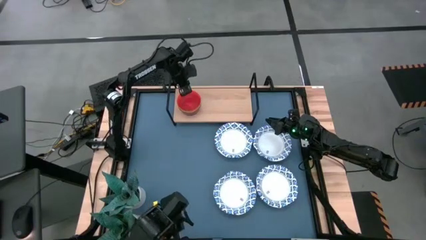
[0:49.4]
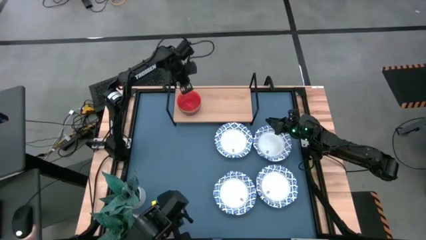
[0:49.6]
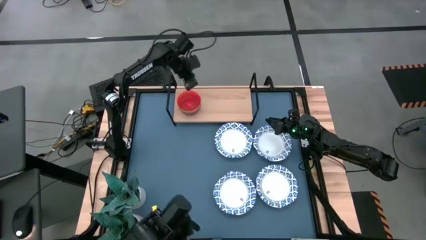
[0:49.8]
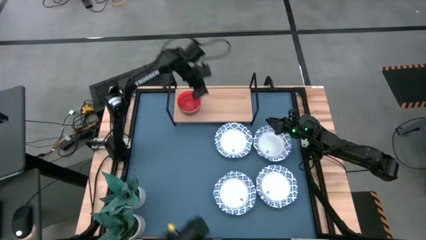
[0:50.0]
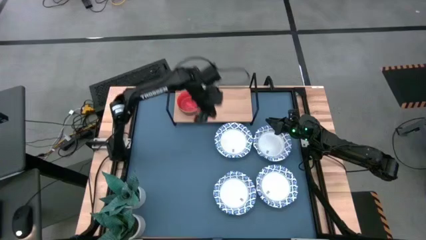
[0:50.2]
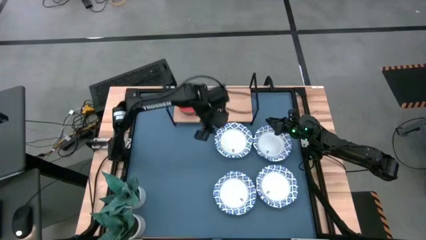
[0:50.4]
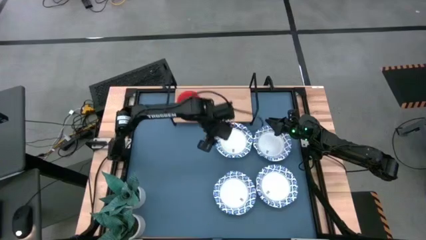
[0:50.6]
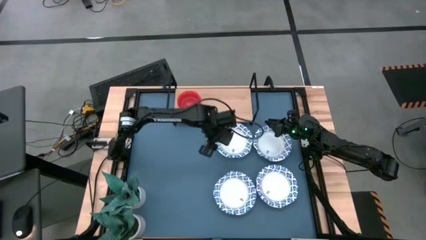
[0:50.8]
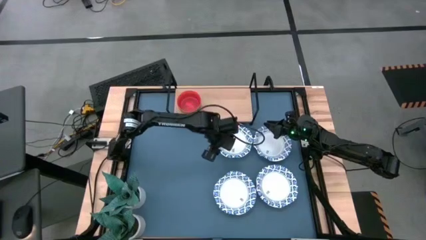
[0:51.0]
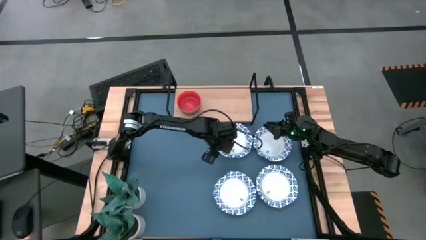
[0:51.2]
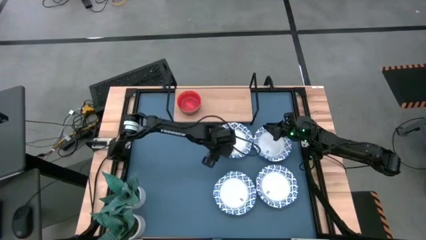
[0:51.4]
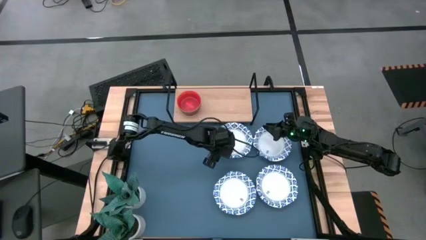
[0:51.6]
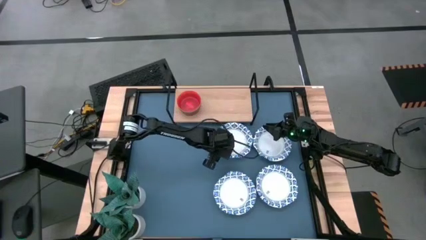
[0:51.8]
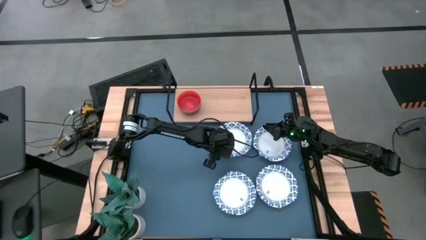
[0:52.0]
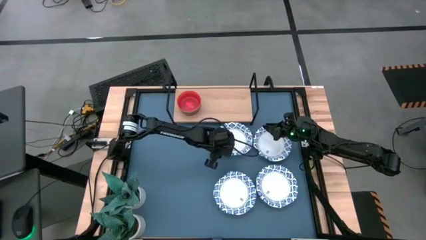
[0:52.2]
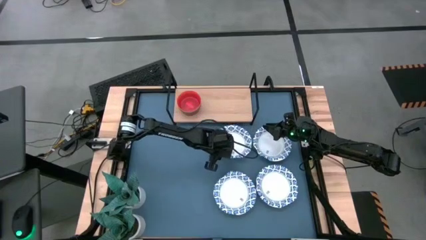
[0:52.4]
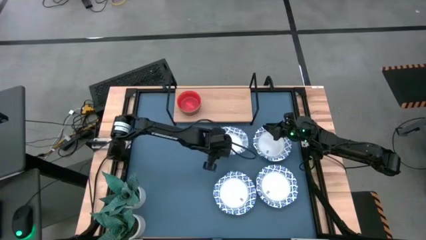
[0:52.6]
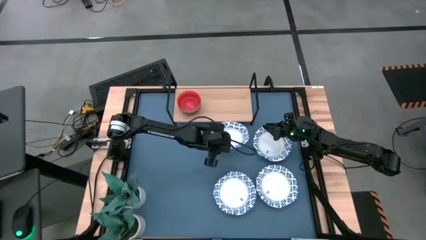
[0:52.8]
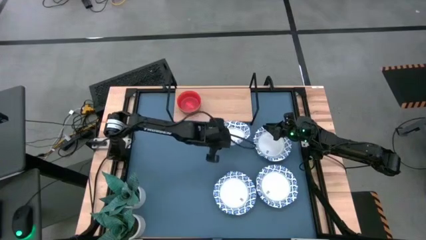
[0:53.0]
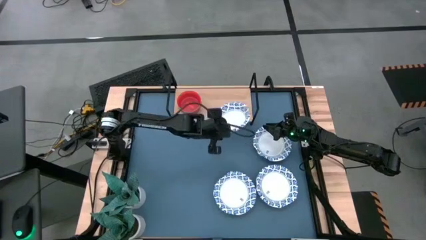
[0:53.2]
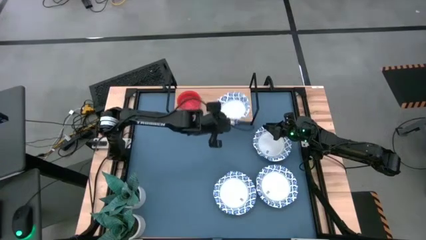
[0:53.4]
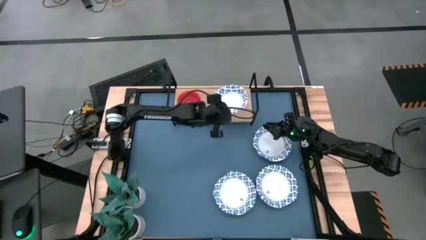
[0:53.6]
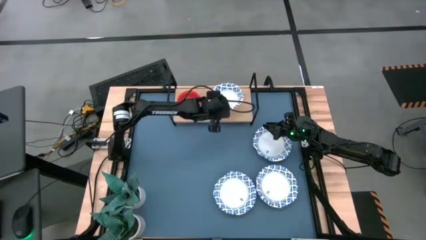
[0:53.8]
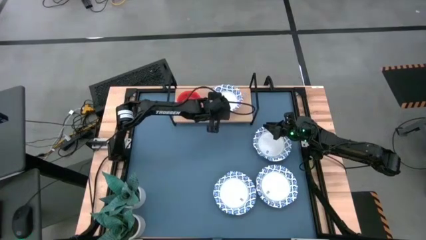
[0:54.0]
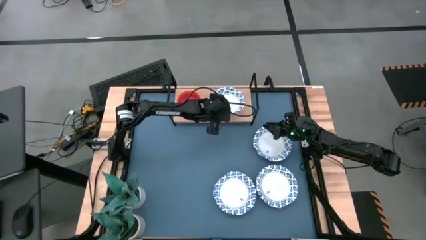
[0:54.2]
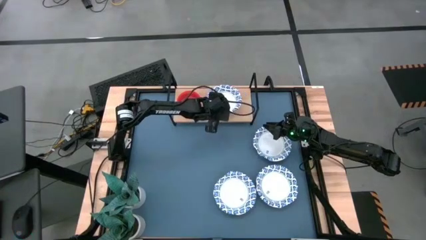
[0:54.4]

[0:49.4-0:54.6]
Task: Place and stack bowls onto a shelf
Put the top left blue patterned paper bowl on the shelf

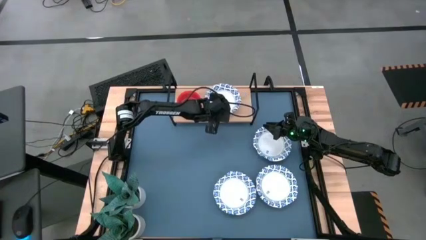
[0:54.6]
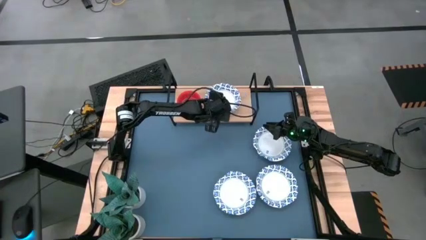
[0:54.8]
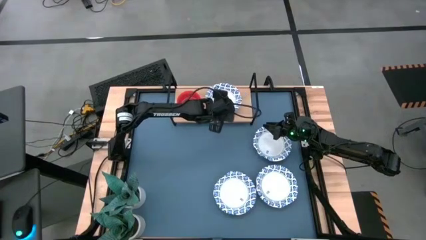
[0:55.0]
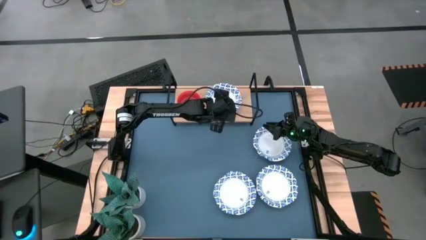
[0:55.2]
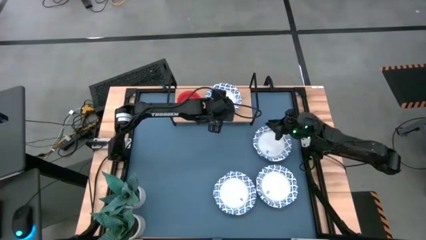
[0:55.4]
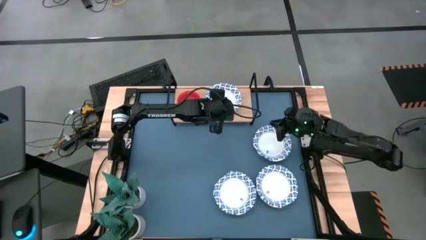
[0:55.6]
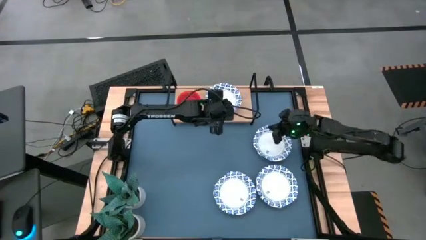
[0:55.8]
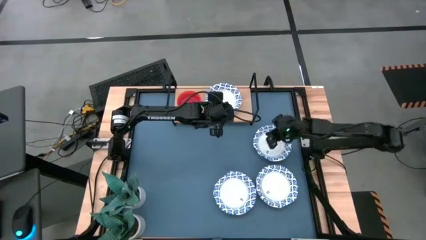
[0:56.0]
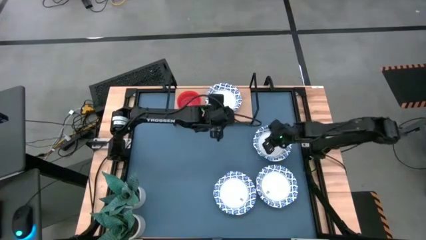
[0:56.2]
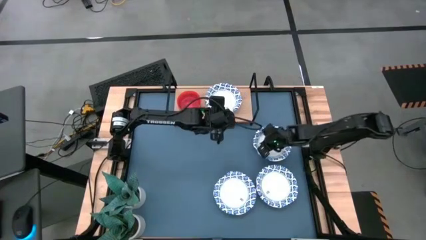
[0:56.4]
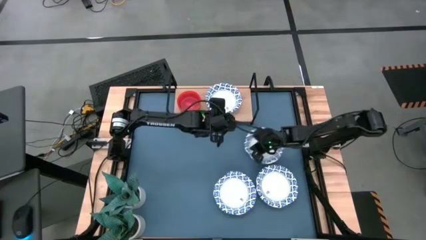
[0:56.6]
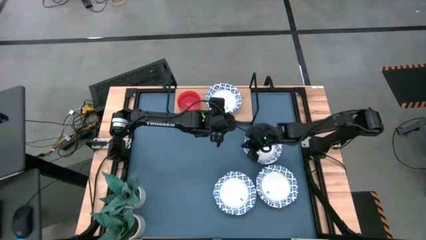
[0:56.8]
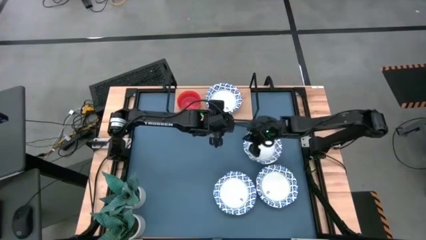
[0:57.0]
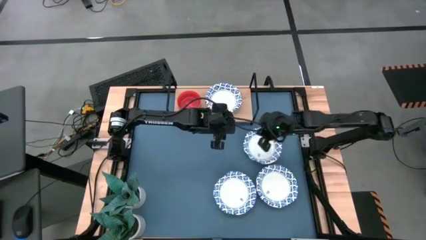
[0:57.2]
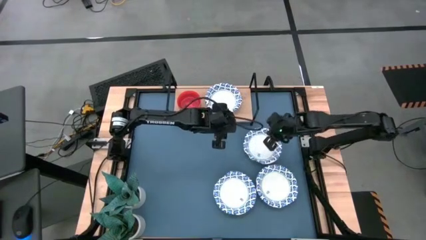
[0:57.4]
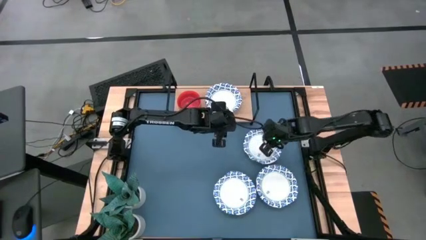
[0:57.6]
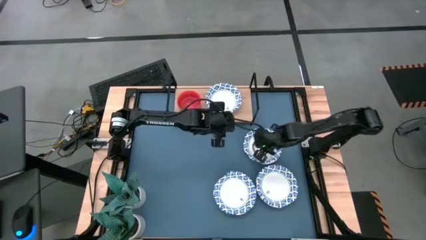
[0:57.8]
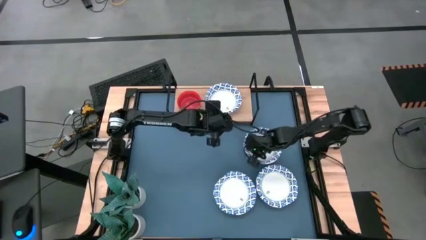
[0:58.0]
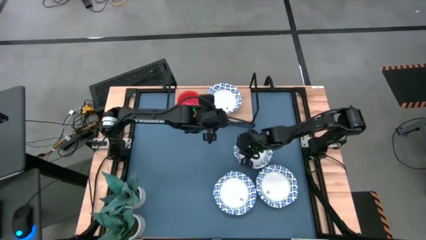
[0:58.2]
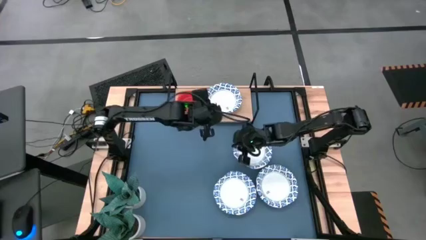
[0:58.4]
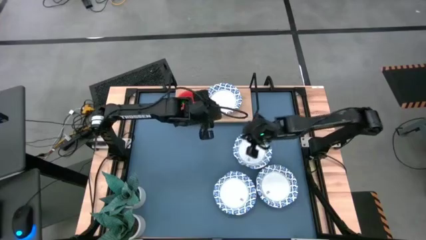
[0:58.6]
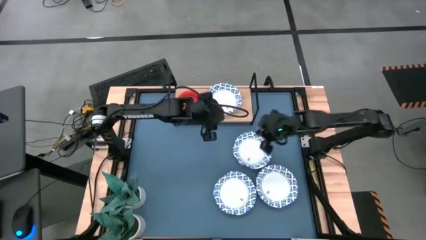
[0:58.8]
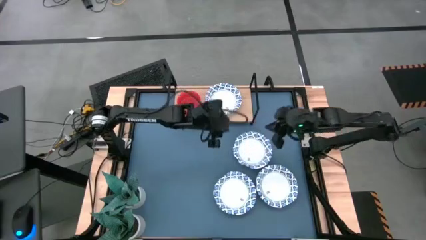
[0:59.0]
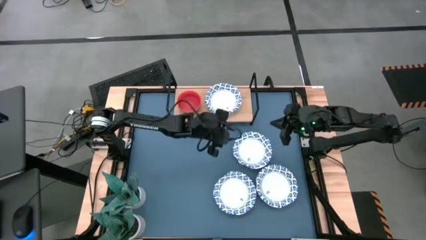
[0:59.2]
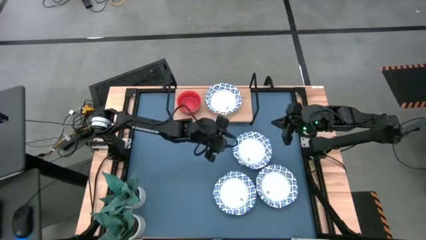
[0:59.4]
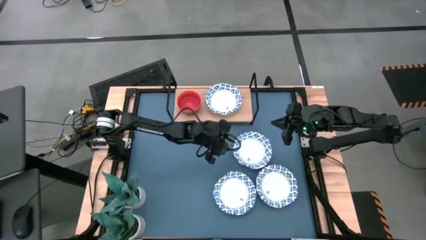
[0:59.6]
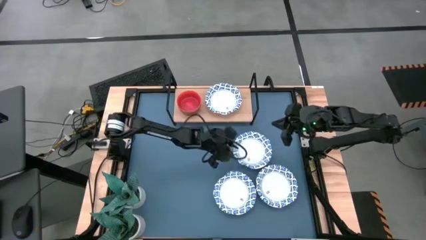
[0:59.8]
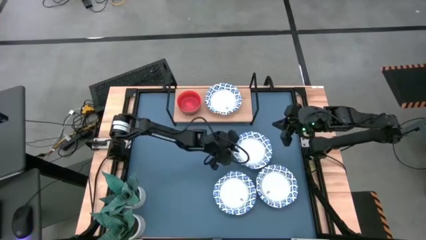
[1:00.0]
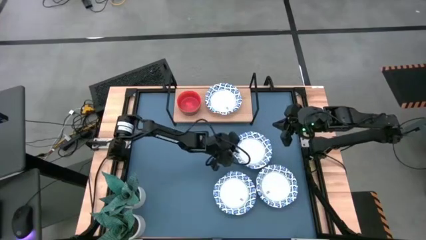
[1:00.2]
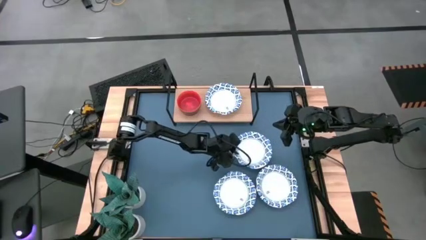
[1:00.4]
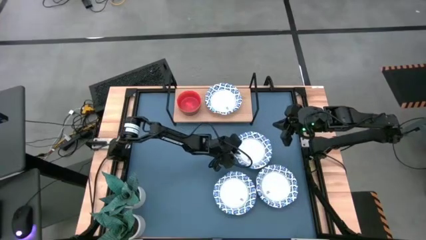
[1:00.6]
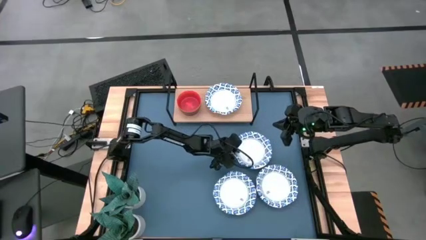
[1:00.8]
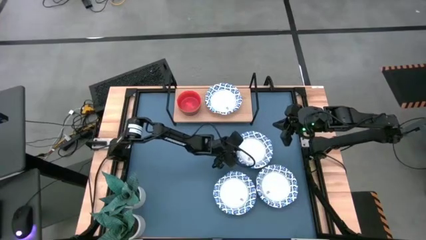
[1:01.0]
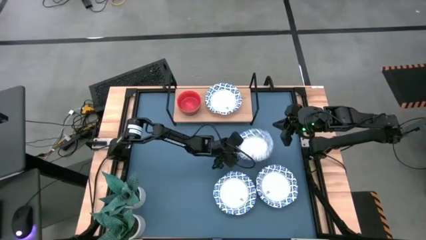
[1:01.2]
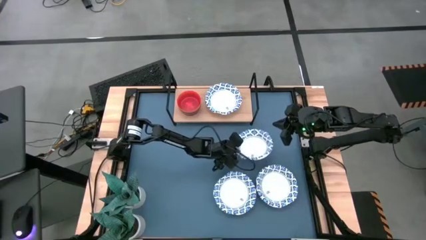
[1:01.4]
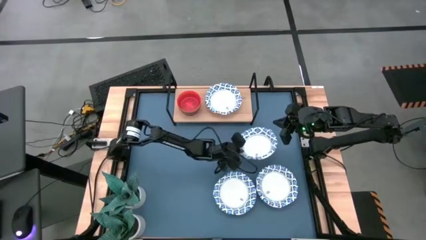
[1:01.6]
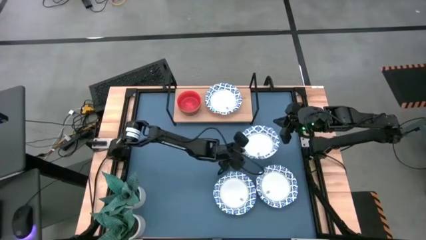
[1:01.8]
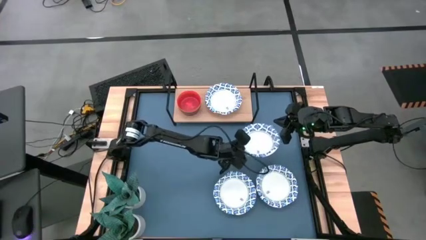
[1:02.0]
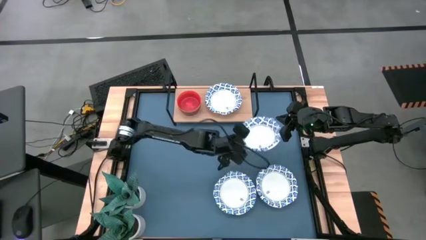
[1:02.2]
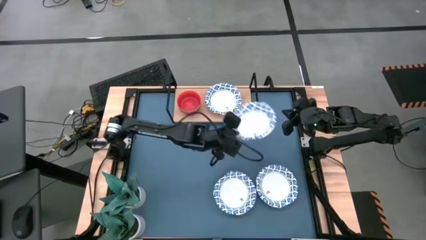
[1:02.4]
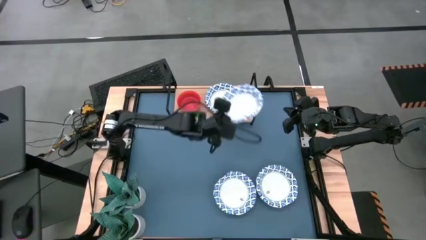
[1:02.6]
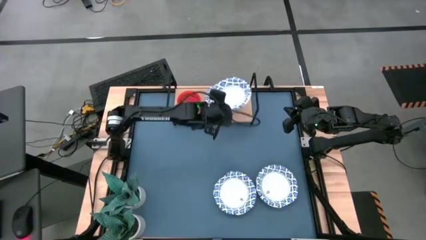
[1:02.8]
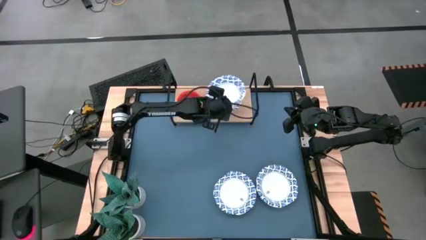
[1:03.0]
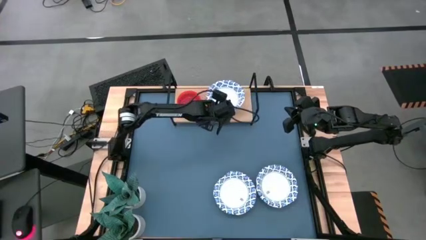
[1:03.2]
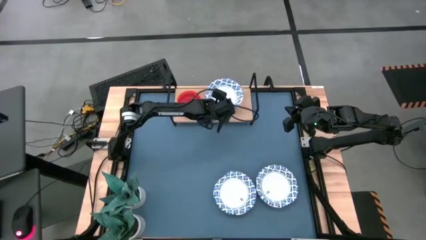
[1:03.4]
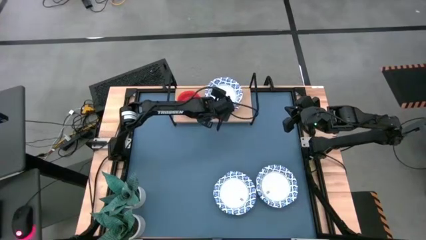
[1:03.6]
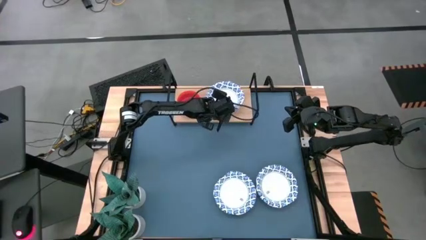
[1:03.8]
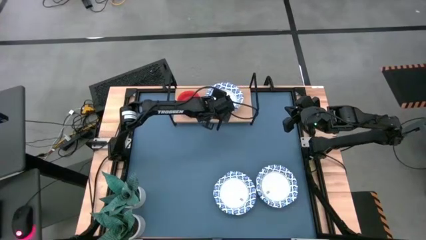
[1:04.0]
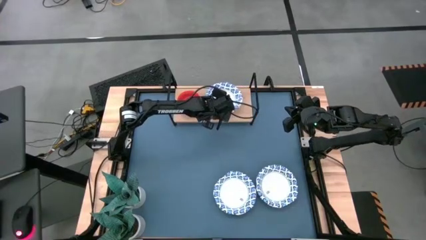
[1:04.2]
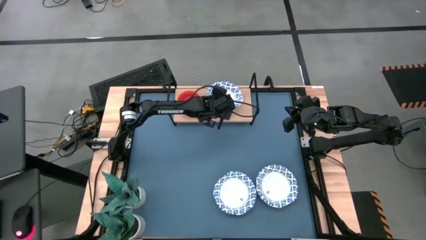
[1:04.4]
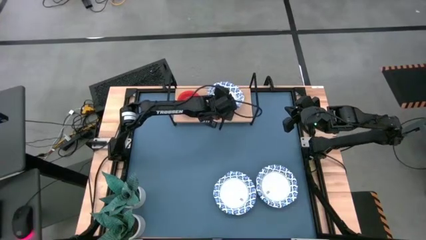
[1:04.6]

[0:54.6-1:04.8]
Stack the top right blue patterned paper bowl into the blue patterned paper bowl on the shelf
